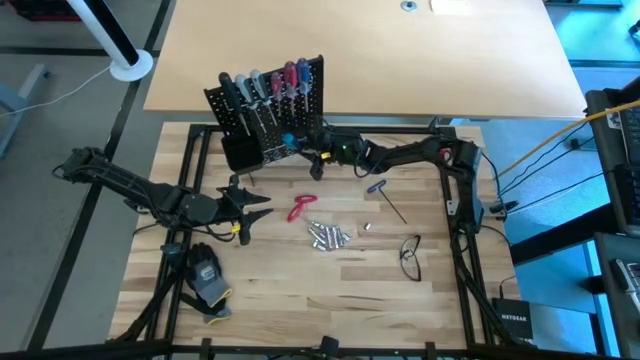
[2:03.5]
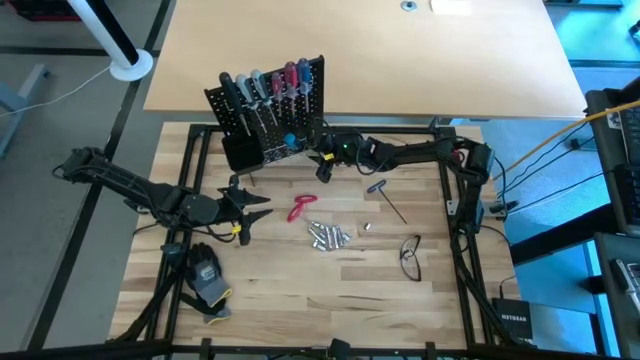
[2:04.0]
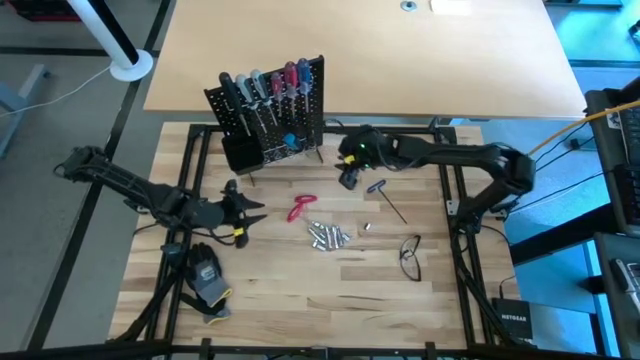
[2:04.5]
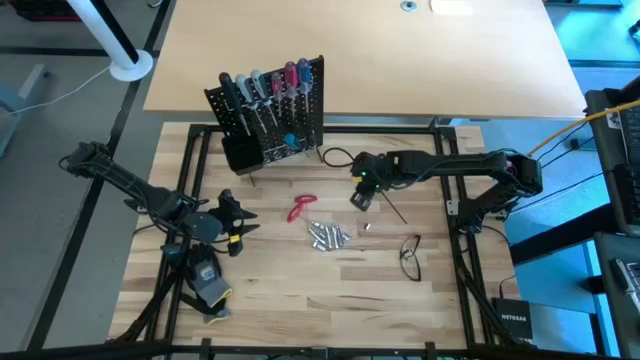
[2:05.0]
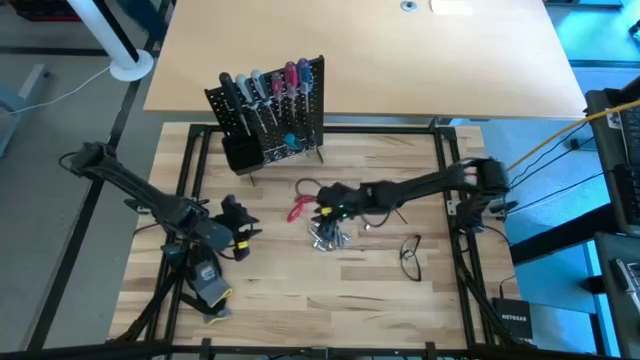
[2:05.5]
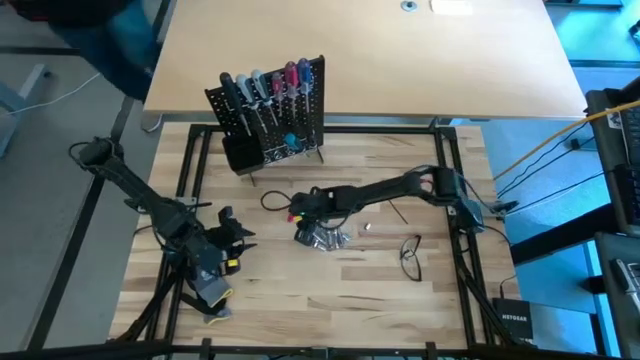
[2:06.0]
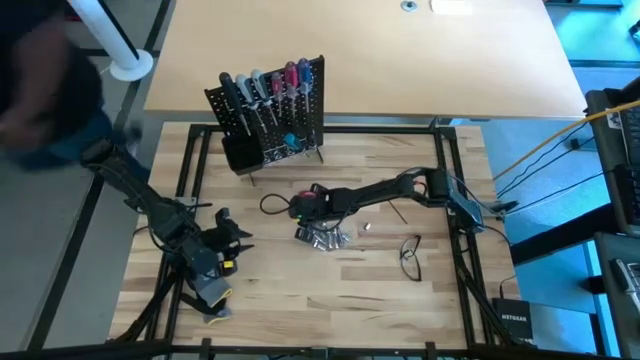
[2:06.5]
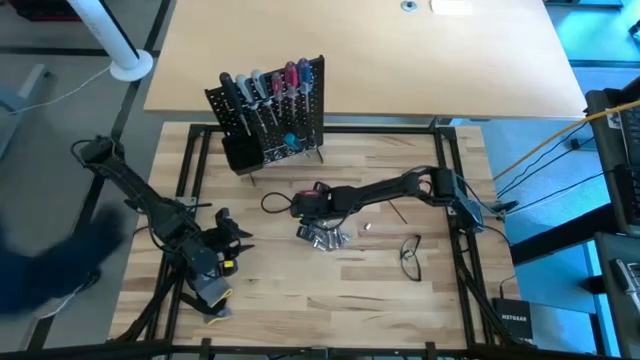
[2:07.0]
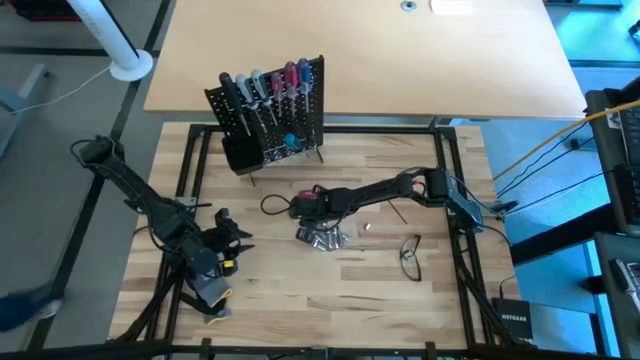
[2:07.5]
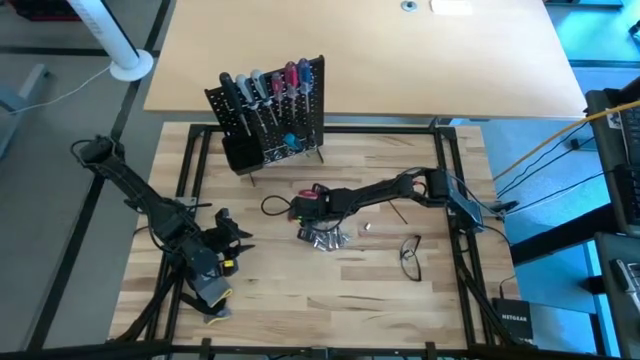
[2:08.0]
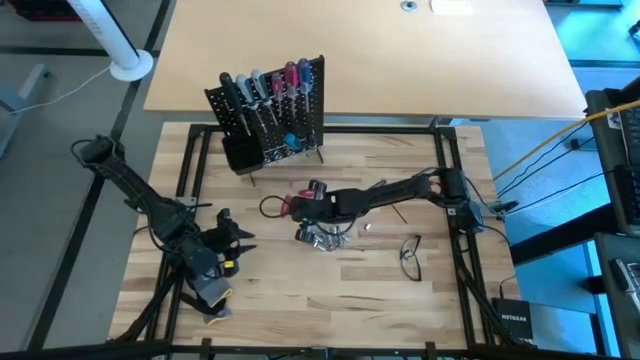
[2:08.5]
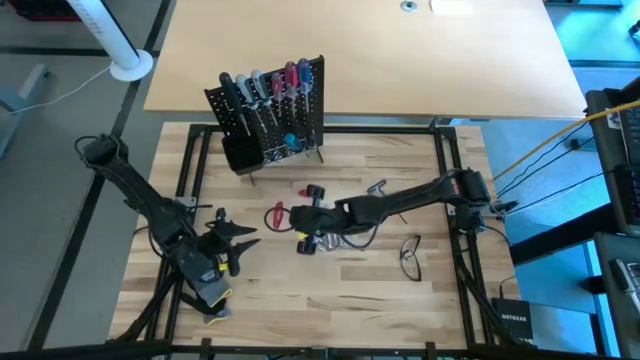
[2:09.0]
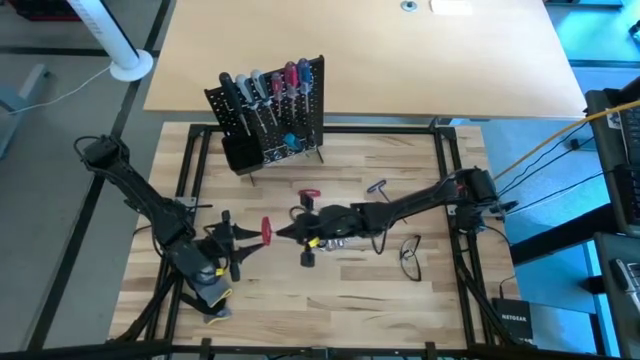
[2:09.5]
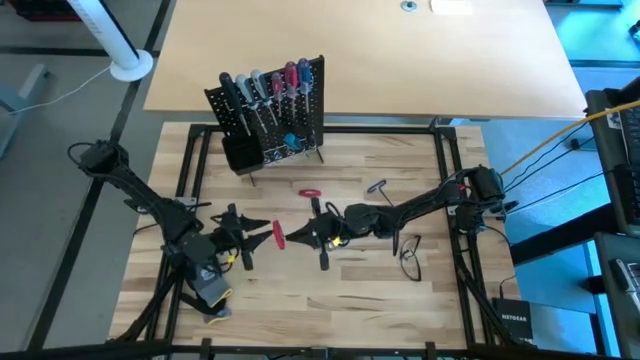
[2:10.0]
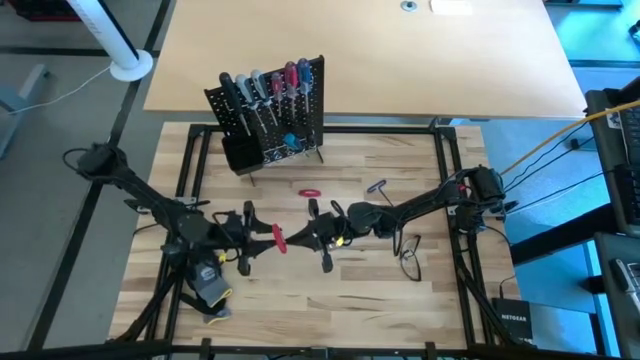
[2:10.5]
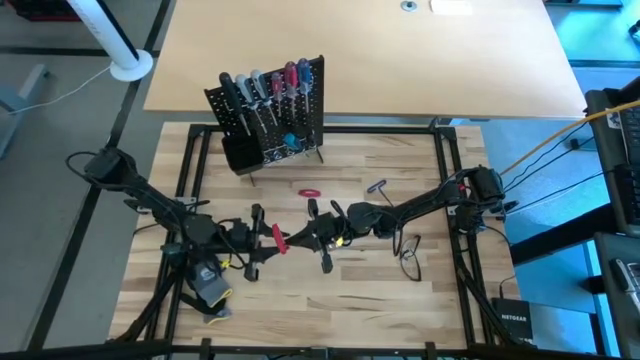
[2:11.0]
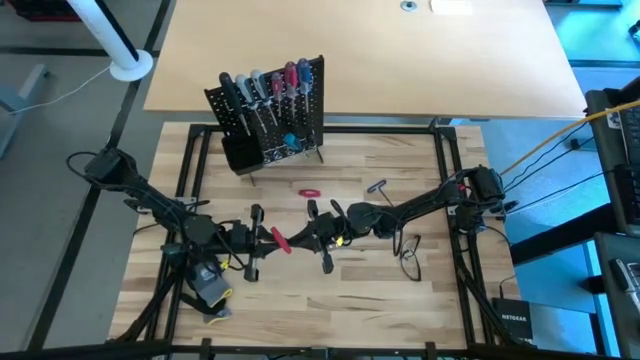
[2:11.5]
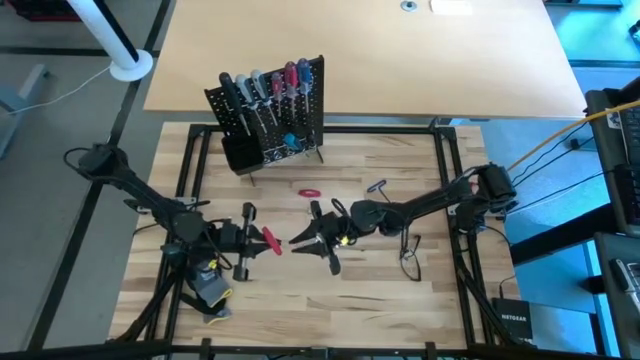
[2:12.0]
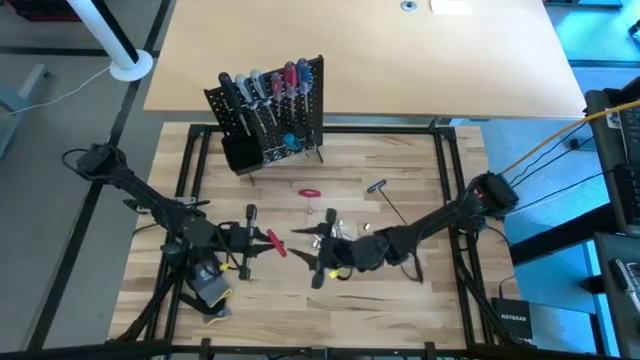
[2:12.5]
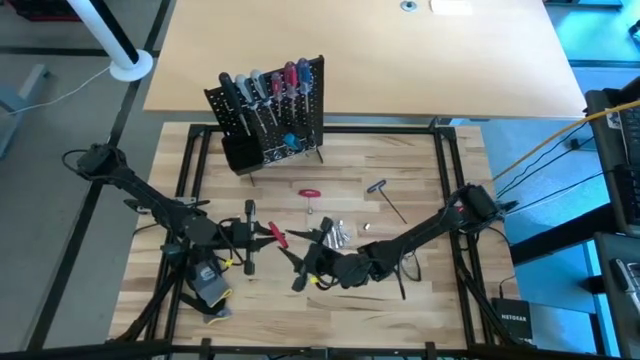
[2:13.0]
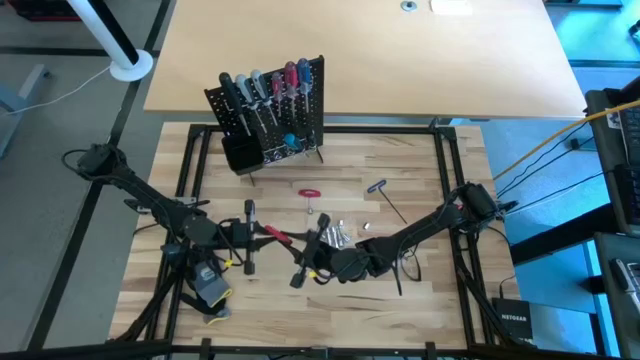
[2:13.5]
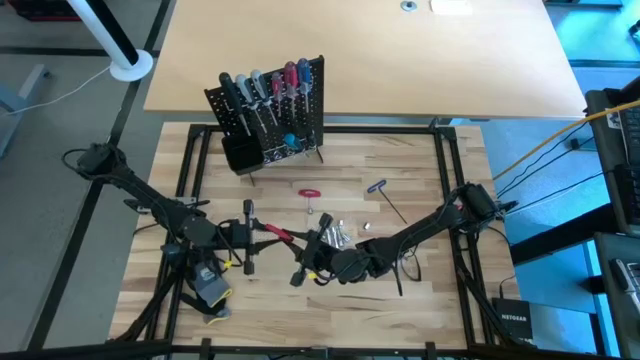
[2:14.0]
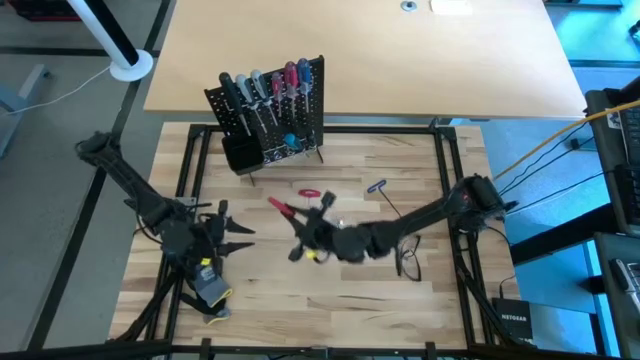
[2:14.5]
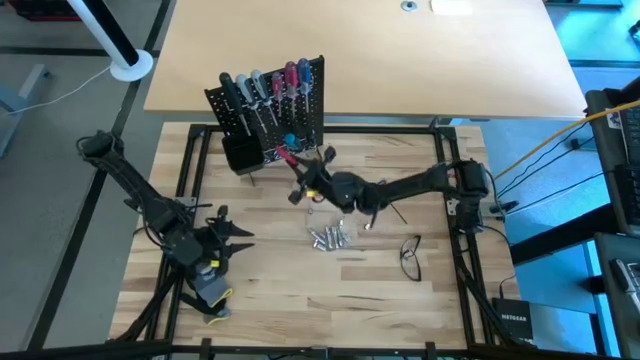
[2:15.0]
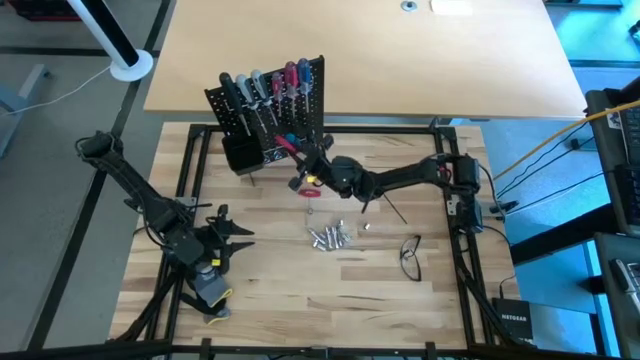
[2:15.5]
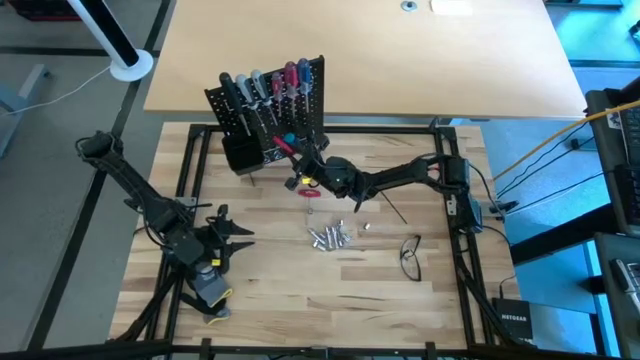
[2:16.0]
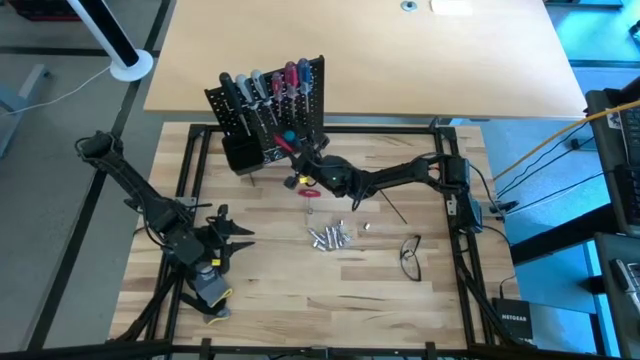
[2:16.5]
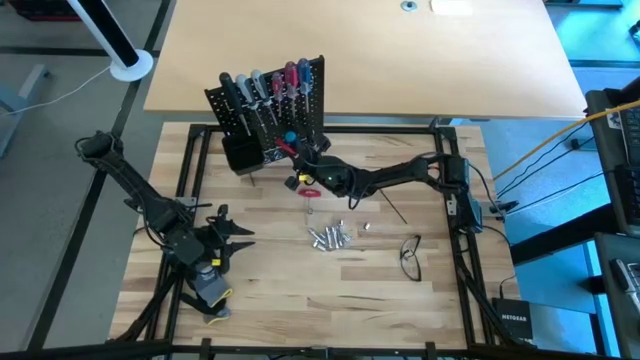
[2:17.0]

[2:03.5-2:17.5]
Task: Hang tools onto peg board
Hang the red allen wrench onto the peg board

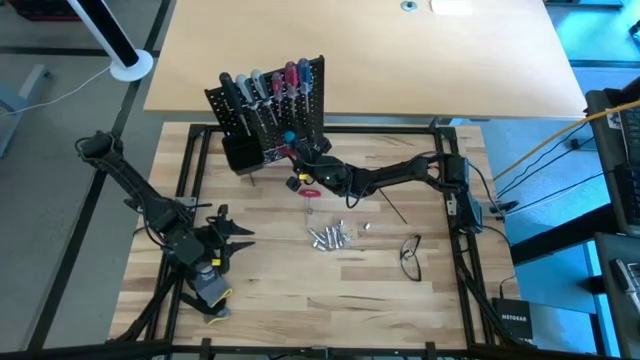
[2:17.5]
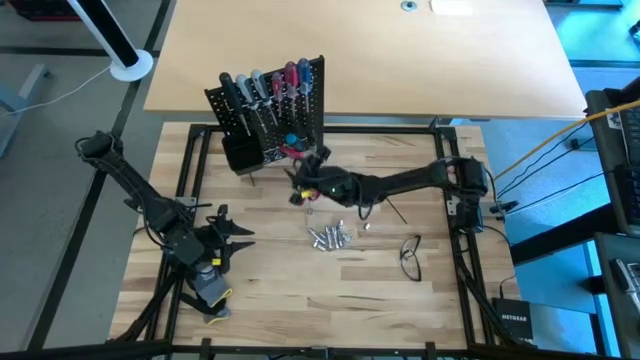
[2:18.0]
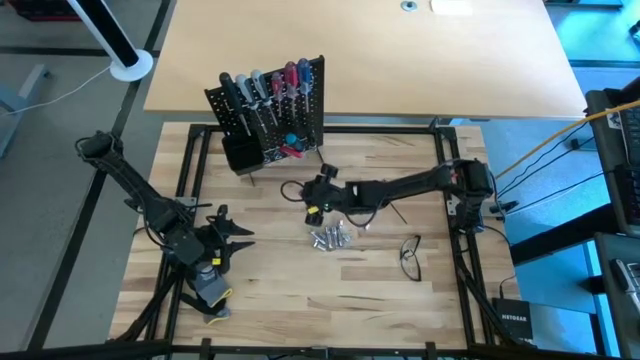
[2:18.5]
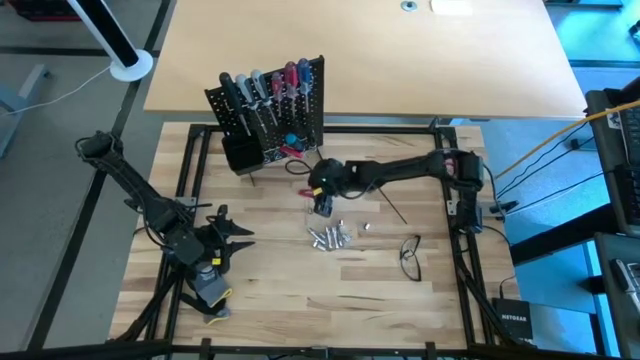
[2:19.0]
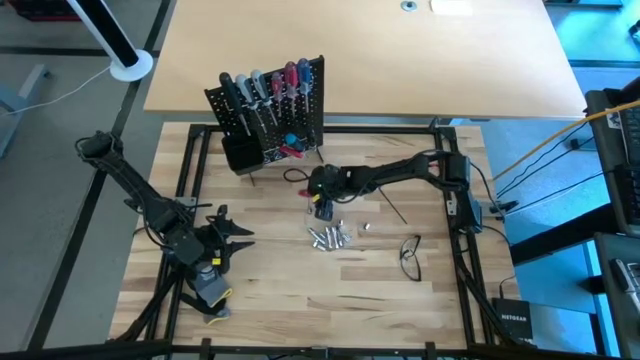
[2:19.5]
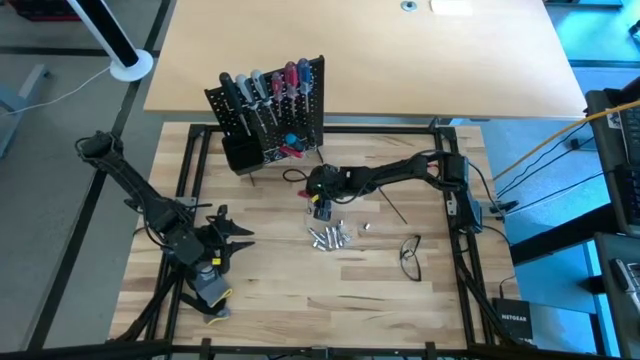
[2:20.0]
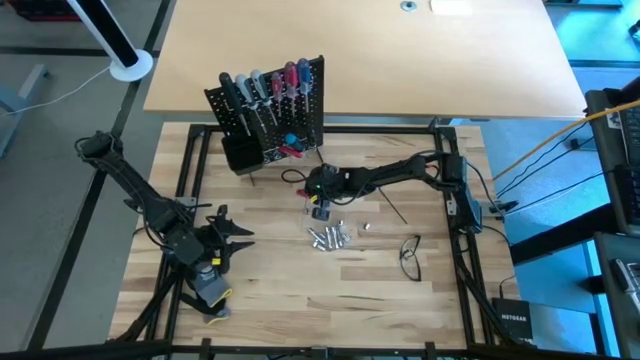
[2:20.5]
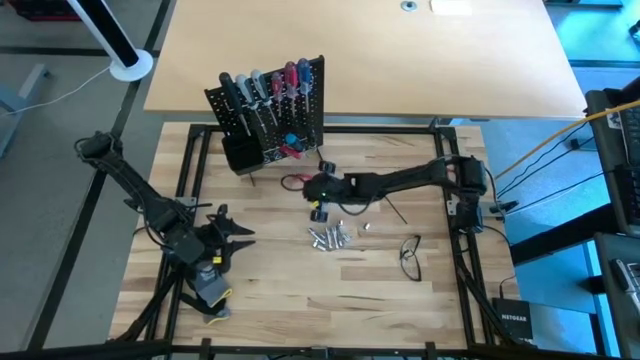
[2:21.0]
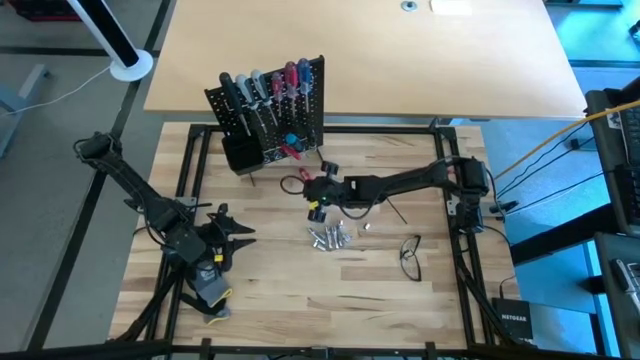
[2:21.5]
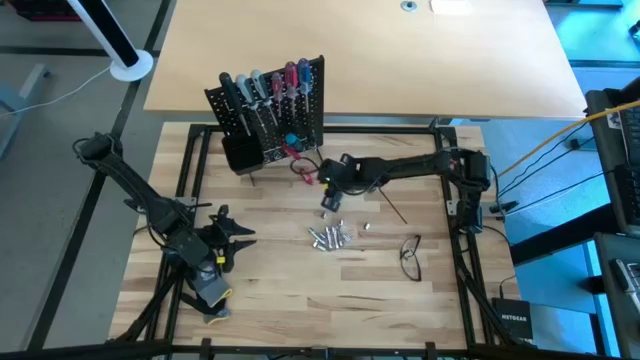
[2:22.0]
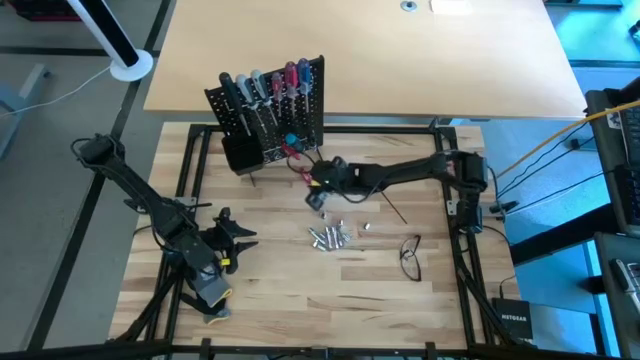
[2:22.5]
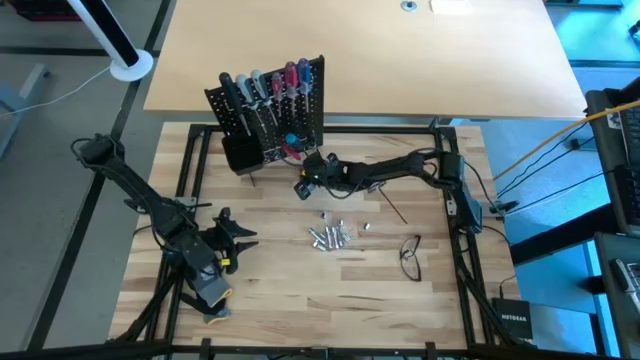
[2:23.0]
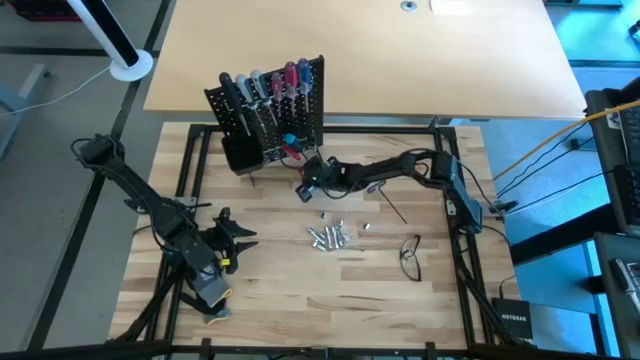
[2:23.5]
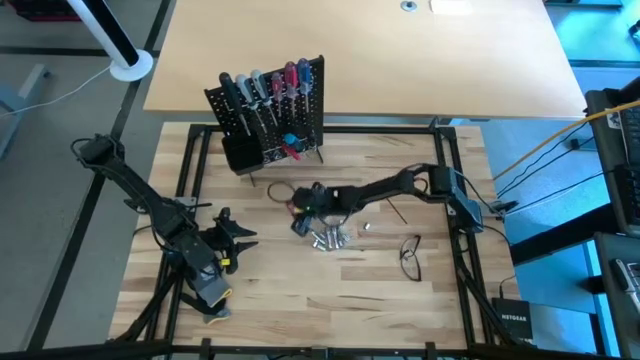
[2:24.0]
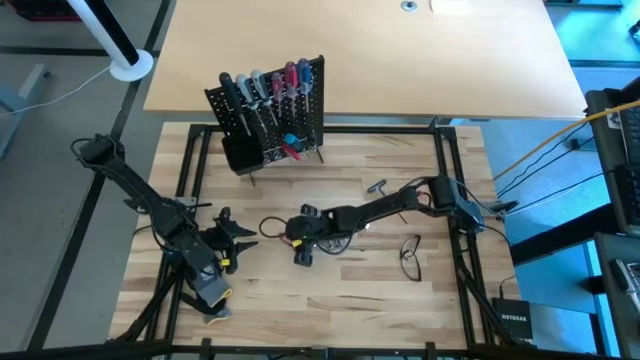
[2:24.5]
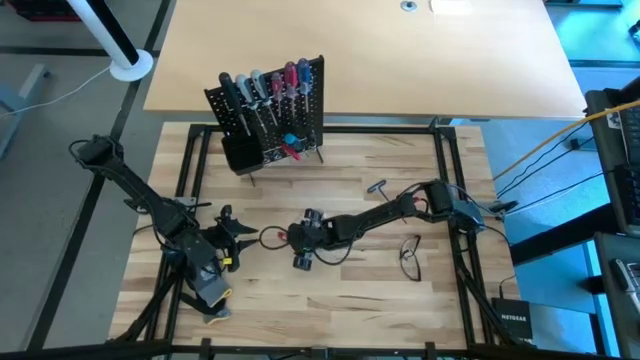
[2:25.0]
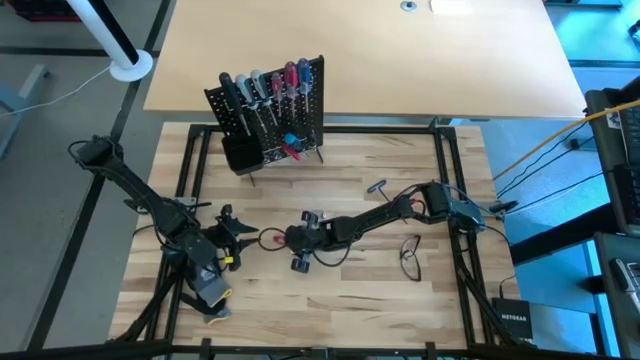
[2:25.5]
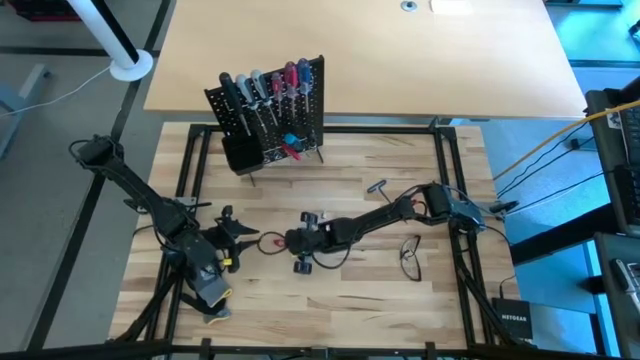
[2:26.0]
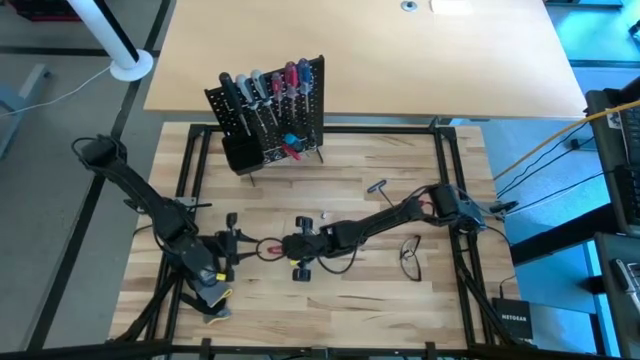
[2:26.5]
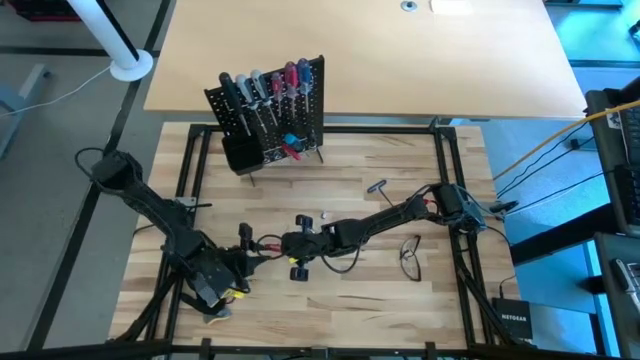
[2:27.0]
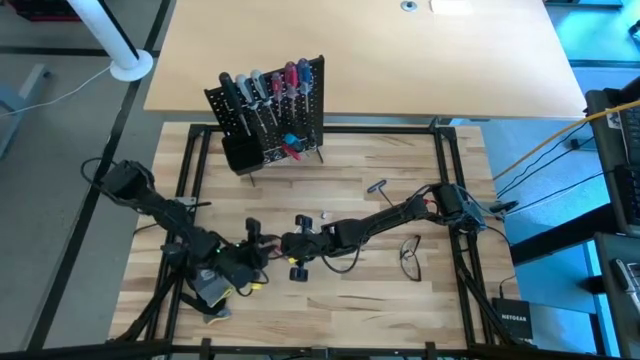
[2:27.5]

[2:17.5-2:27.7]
Hang the red allen wrench onto the peg board
